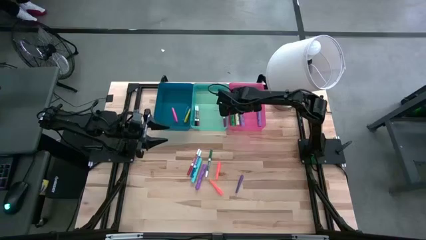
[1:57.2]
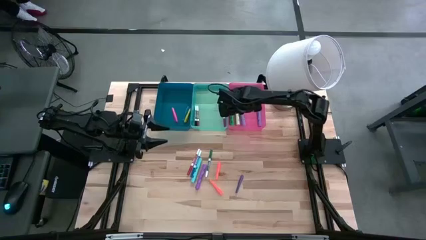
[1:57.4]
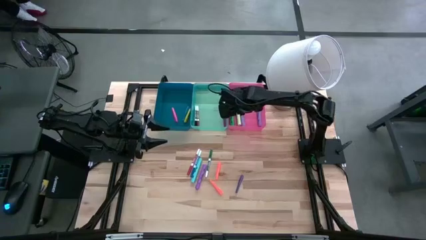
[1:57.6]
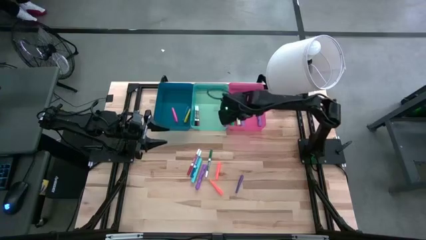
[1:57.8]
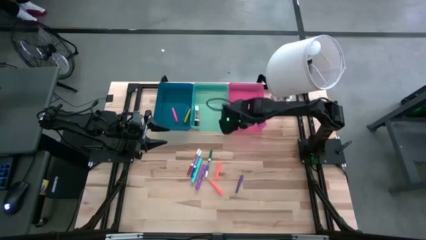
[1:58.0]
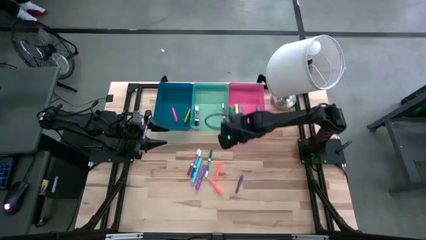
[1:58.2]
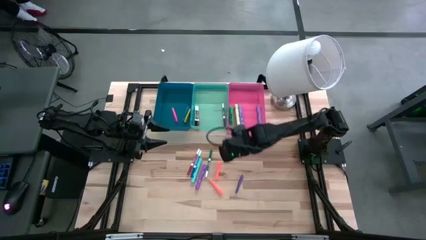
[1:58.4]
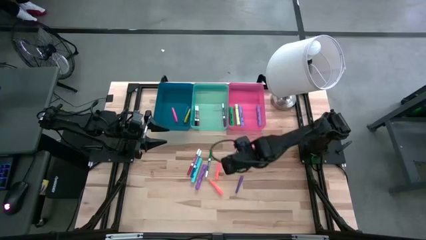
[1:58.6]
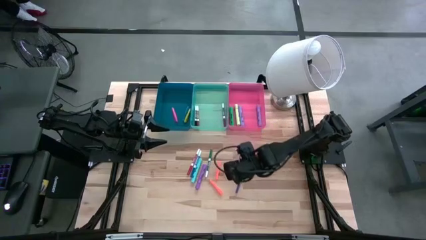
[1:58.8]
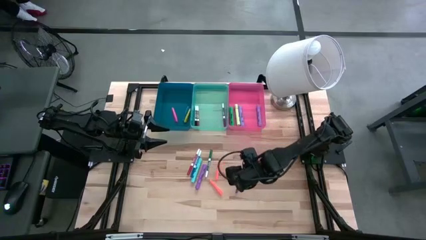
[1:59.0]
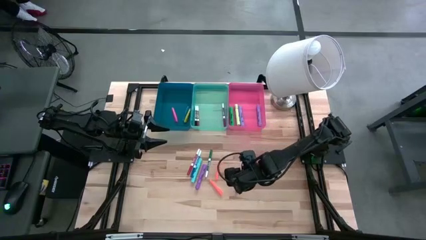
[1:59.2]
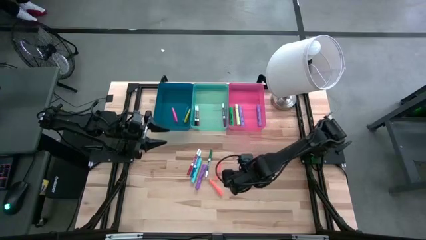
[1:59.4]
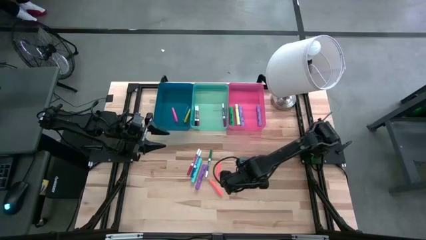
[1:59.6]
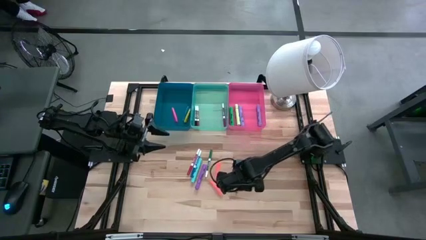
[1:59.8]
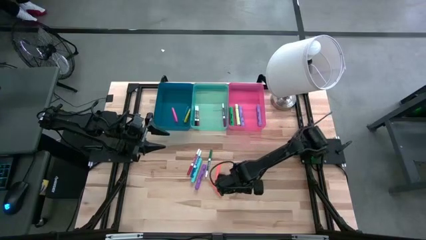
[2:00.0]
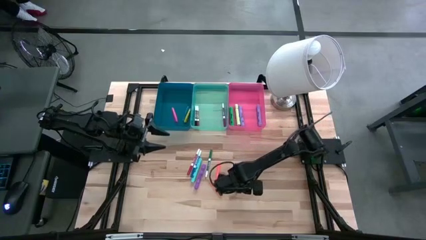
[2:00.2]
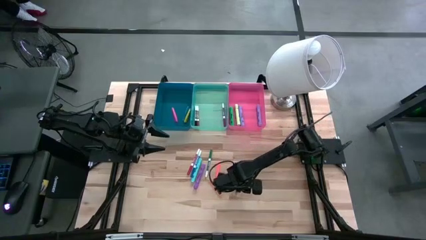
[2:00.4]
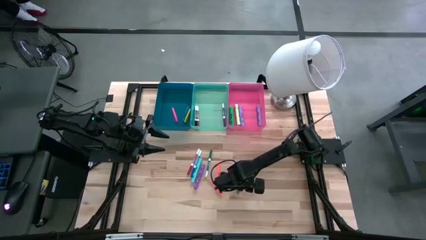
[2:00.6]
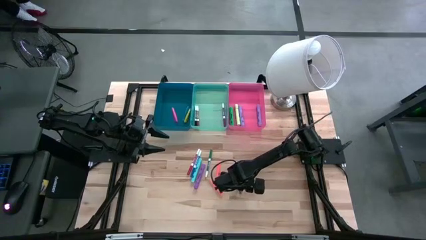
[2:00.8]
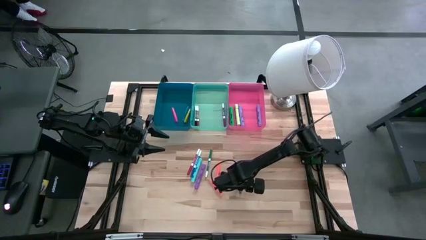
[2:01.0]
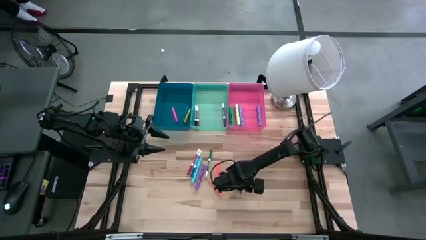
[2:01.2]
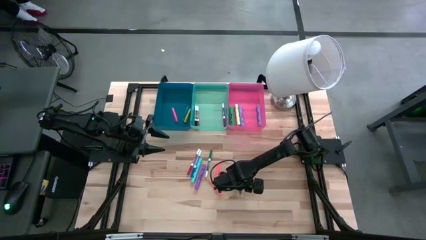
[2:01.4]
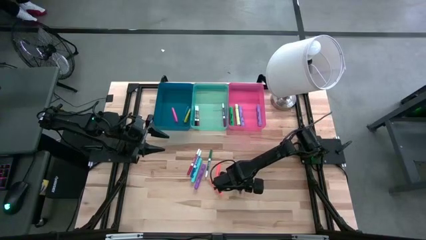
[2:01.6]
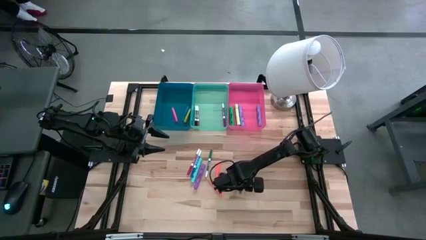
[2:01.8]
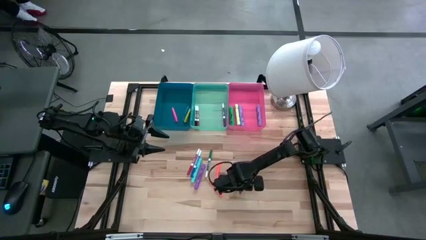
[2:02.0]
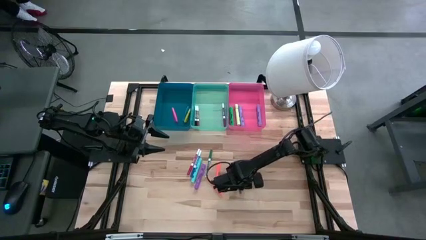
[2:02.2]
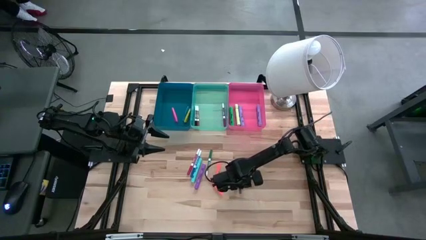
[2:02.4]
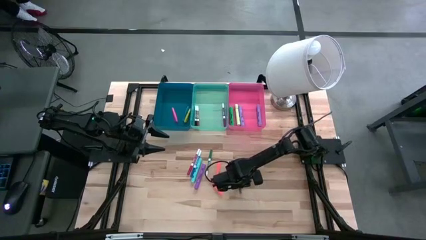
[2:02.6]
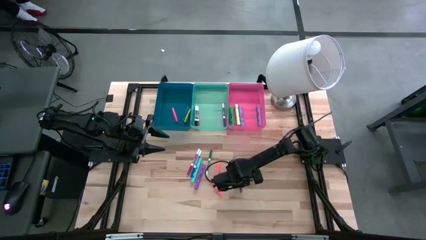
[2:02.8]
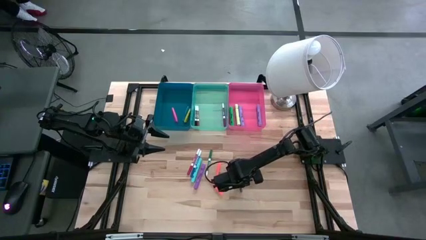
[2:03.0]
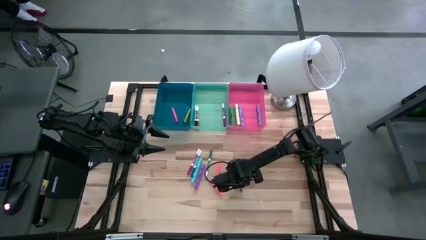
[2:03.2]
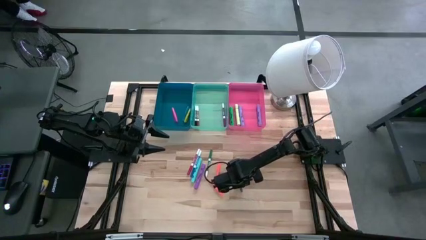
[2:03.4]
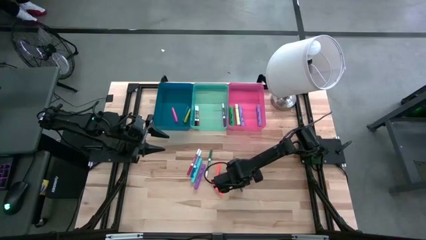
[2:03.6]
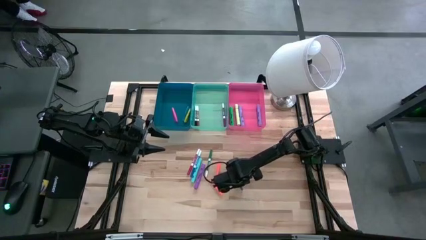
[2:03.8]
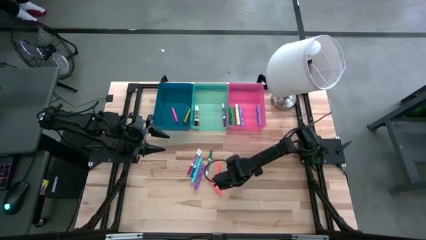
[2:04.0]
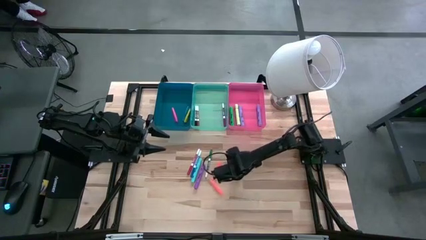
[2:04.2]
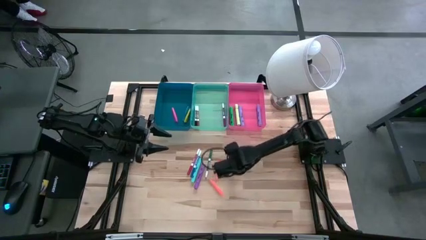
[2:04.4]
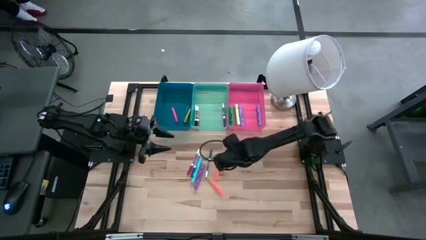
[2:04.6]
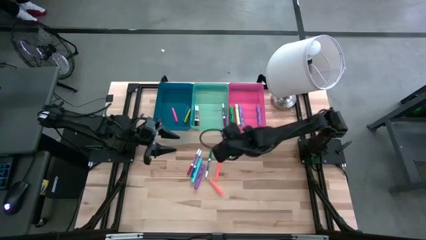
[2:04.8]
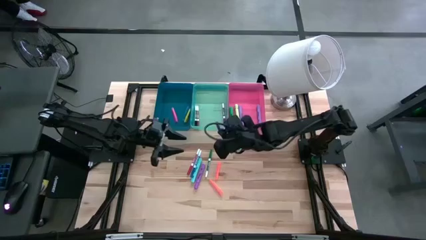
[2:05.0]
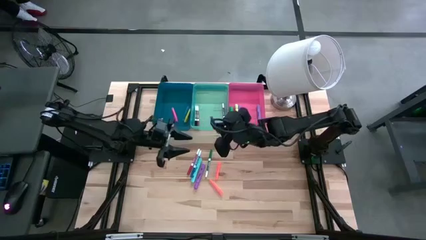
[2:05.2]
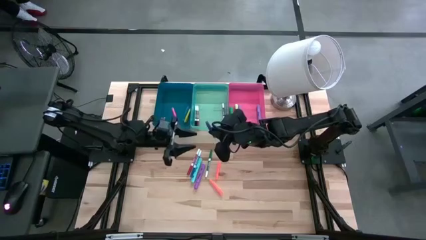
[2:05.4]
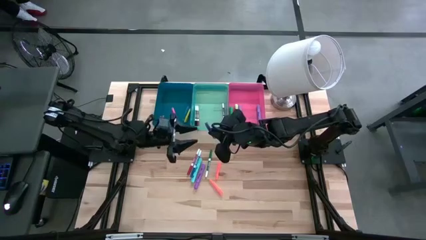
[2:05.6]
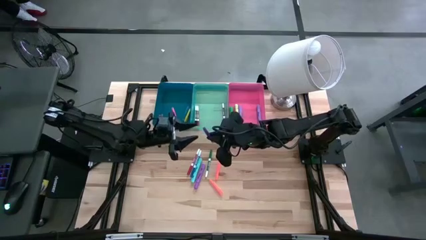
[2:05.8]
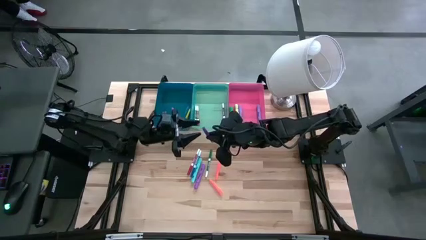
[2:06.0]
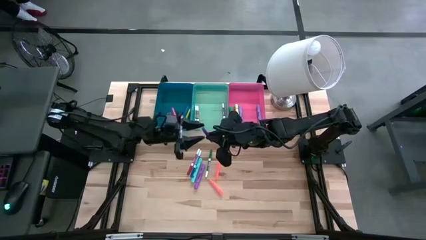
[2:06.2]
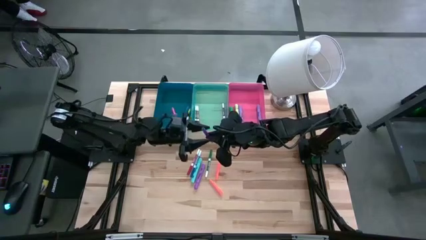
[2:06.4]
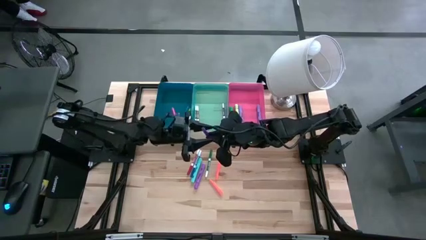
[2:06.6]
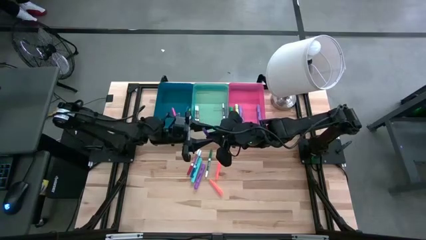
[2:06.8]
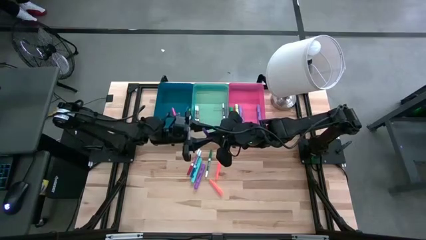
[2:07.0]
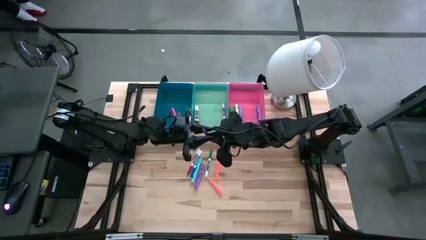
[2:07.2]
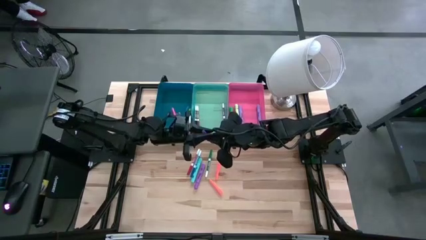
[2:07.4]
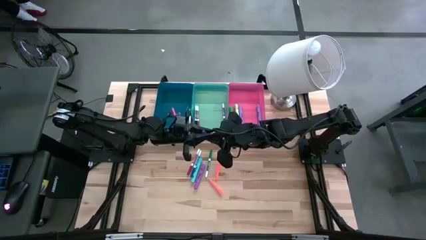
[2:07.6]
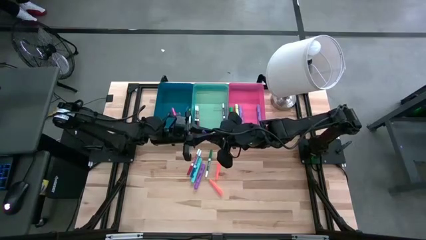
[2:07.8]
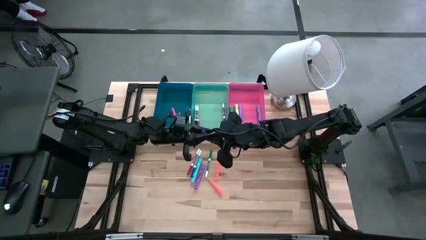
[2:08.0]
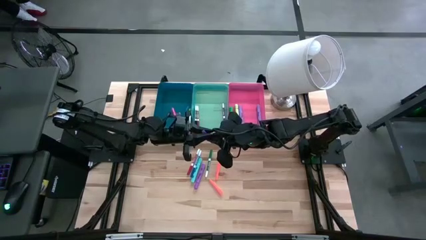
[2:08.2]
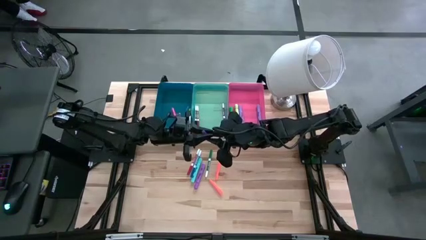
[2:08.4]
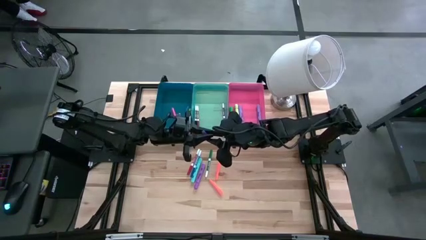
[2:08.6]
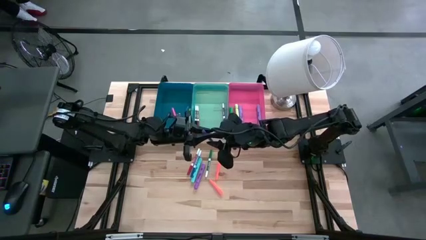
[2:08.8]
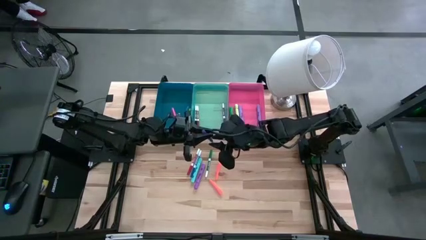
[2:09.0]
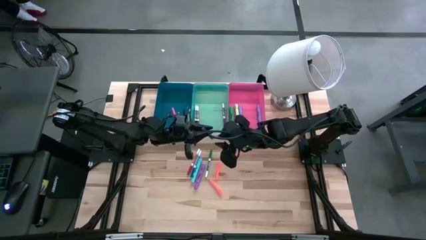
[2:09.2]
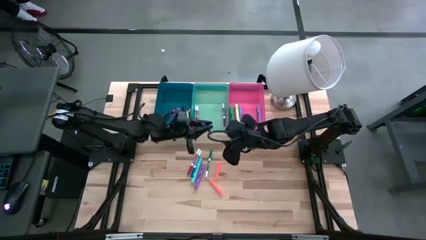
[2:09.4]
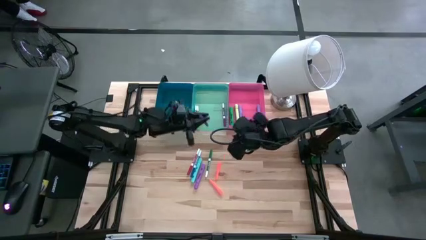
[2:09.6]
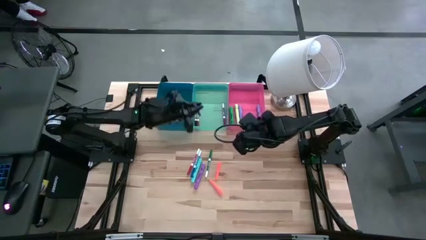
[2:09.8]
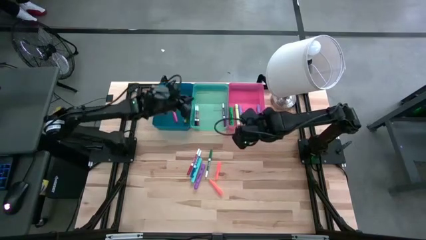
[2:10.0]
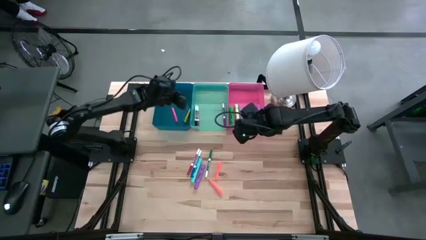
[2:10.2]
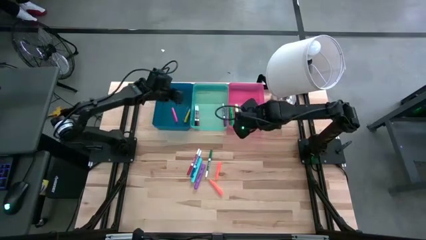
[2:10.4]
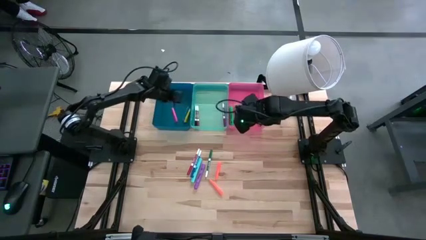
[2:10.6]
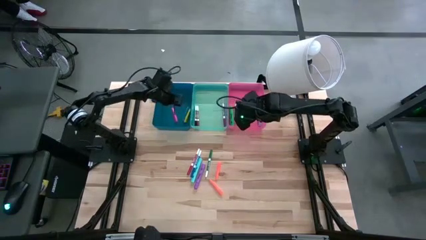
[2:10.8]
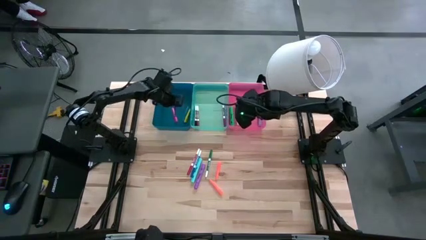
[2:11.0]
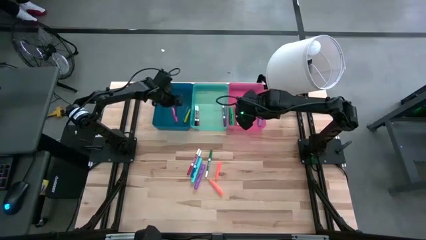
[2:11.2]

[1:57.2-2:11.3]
Task: Pick & Place Markers
Put the purple pen into the blue bin

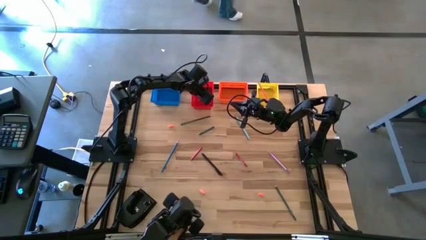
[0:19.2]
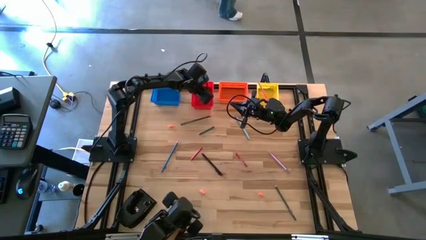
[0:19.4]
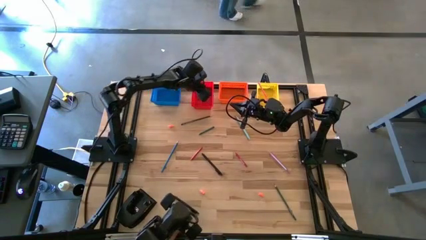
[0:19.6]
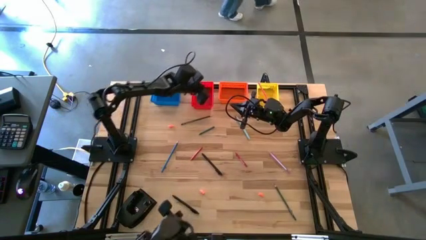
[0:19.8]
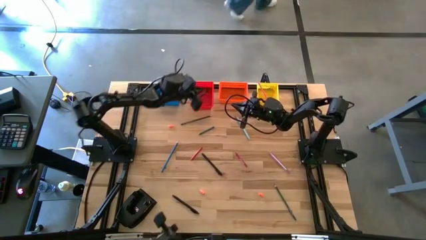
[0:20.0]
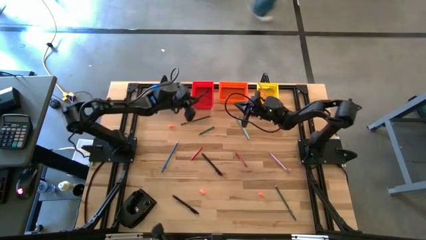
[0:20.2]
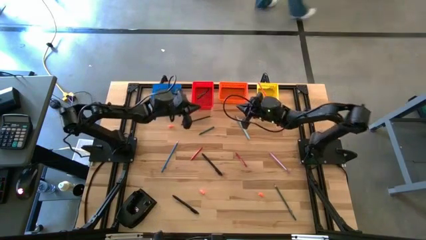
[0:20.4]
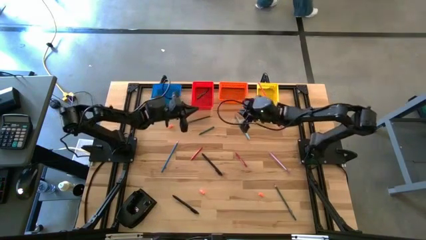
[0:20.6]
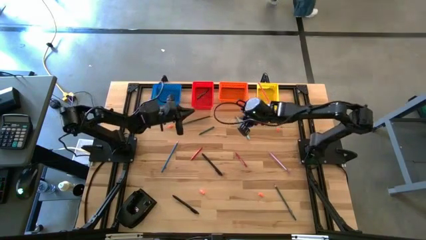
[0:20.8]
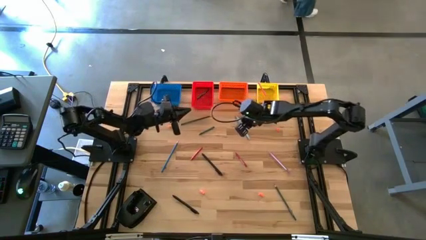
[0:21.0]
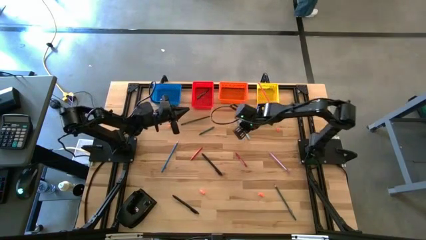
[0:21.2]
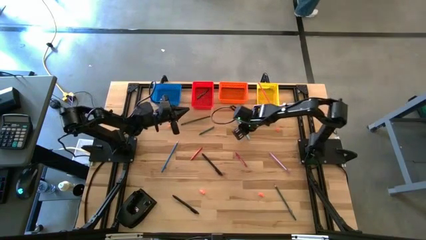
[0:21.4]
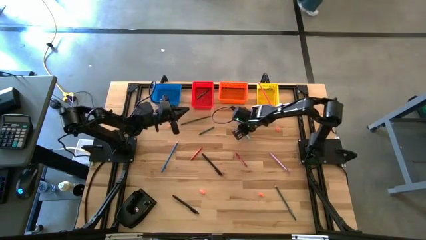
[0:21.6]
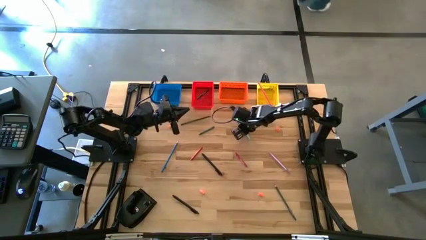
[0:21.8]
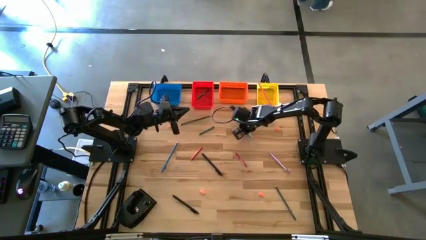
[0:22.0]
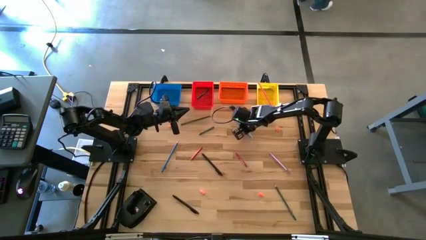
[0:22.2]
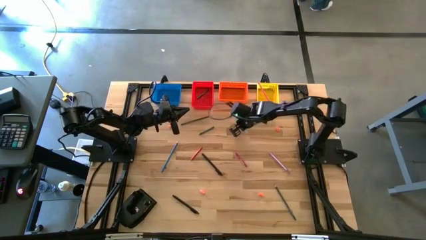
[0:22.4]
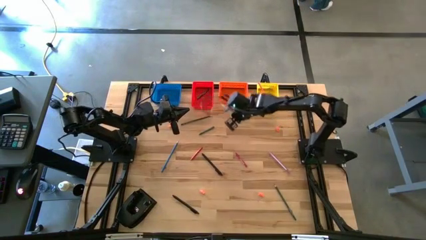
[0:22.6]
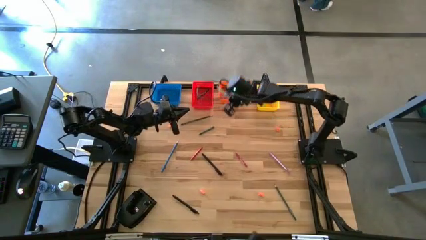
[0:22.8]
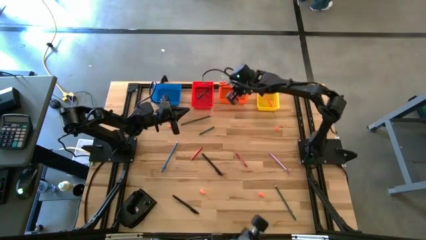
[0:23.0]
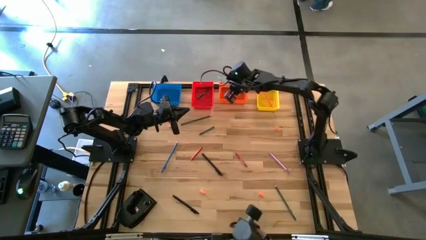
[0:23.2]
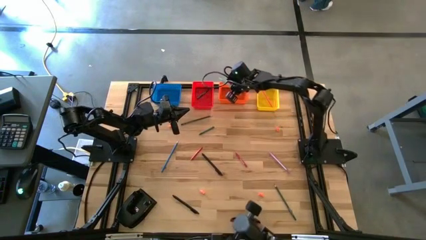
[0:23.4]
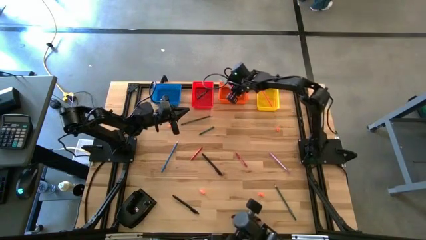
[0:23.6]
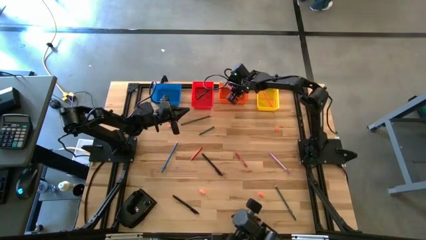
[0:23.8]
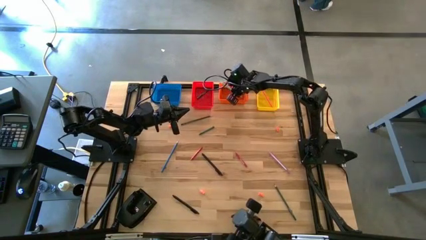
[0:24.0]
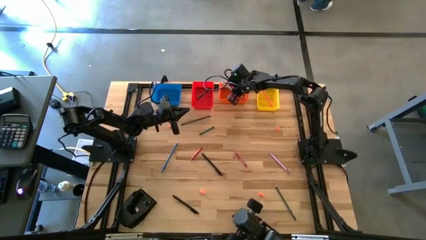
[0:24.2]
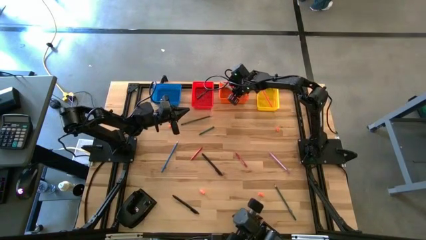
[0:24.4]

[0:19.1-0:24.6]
Task: Sort crayons/erasers/pens/pencils in bins
Put the light blue pen into the orange bin
